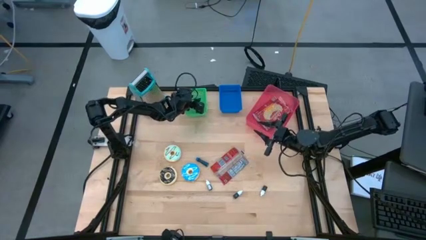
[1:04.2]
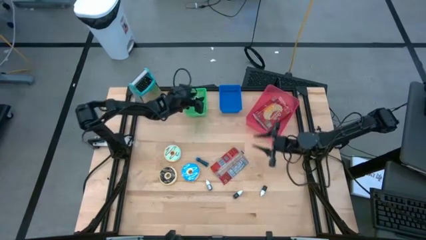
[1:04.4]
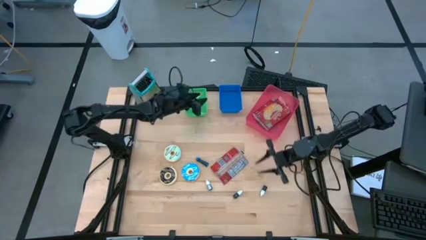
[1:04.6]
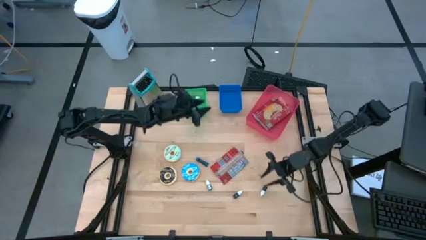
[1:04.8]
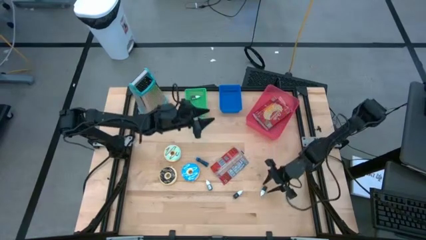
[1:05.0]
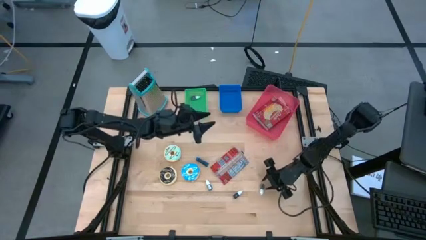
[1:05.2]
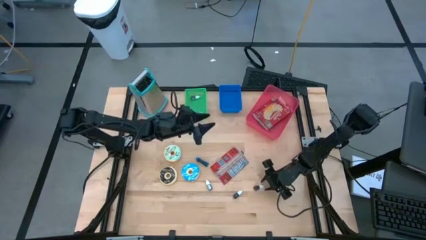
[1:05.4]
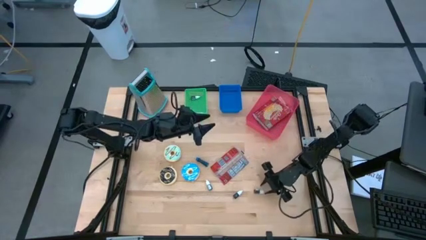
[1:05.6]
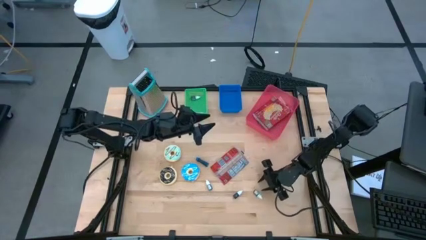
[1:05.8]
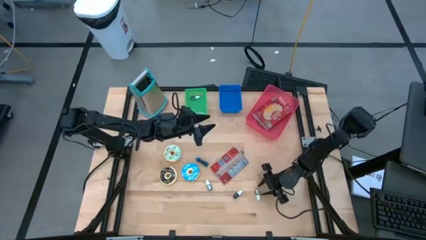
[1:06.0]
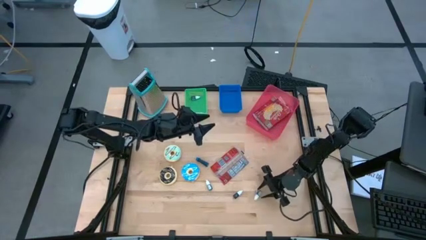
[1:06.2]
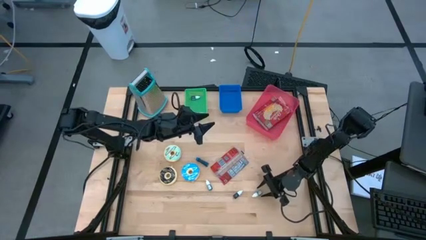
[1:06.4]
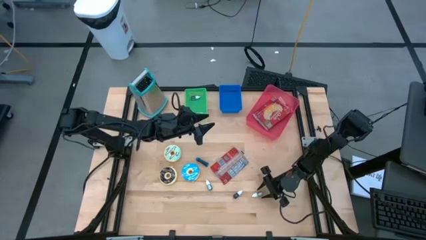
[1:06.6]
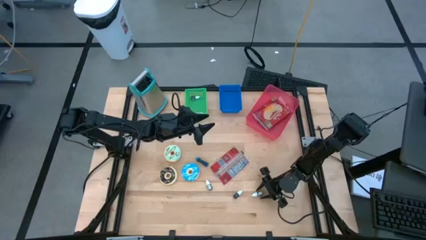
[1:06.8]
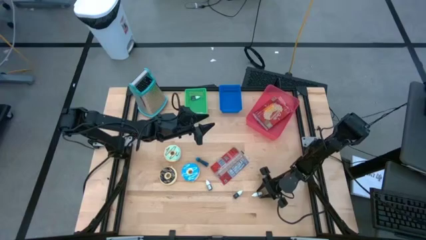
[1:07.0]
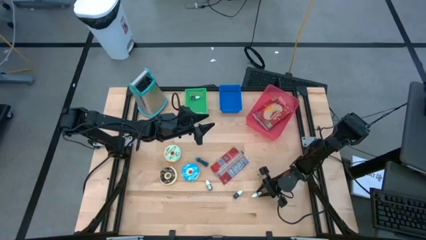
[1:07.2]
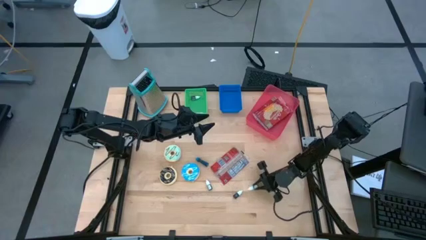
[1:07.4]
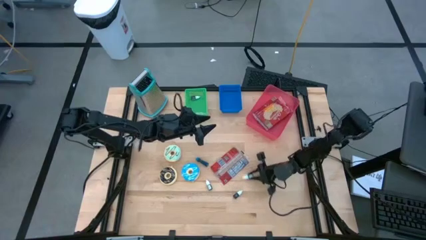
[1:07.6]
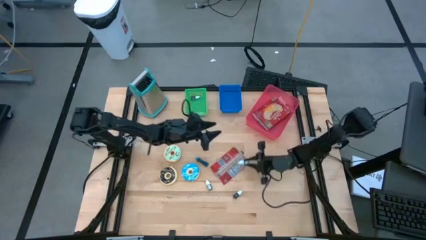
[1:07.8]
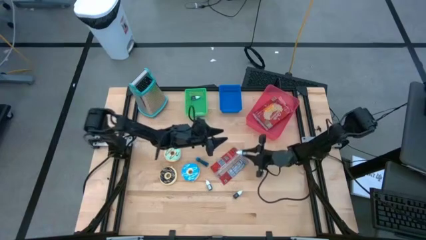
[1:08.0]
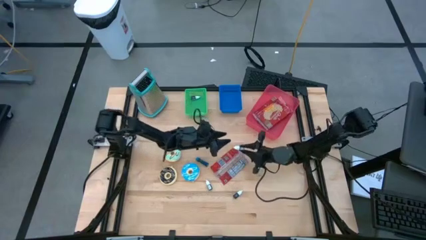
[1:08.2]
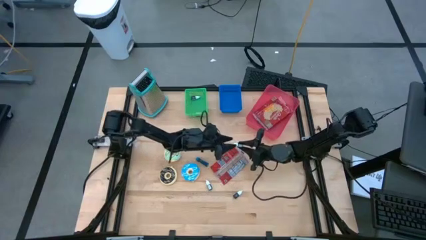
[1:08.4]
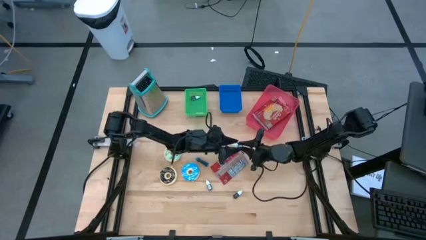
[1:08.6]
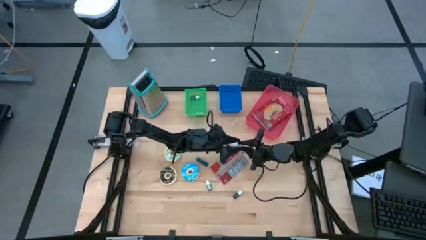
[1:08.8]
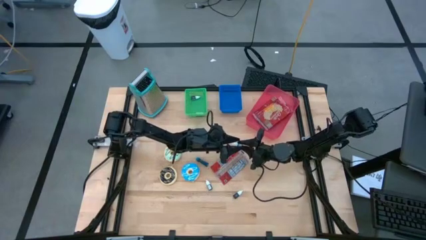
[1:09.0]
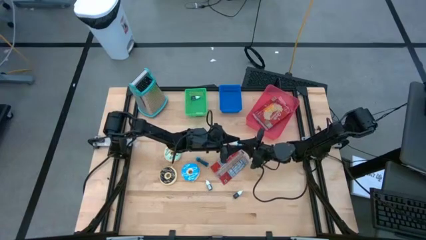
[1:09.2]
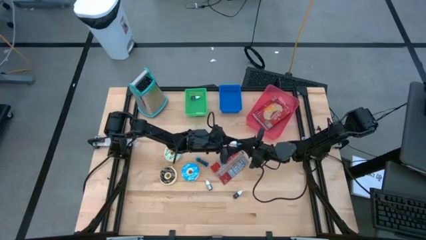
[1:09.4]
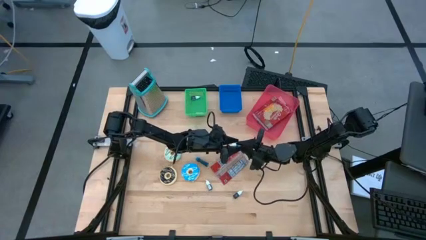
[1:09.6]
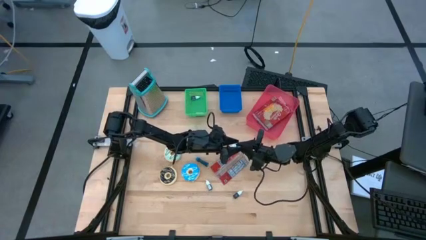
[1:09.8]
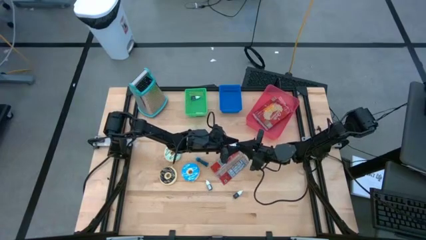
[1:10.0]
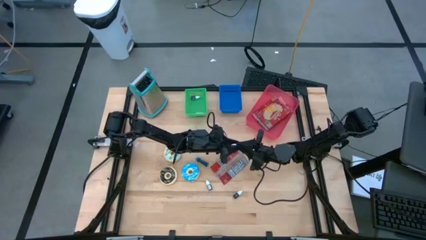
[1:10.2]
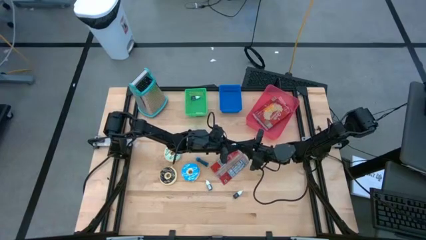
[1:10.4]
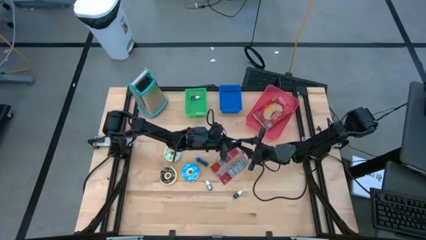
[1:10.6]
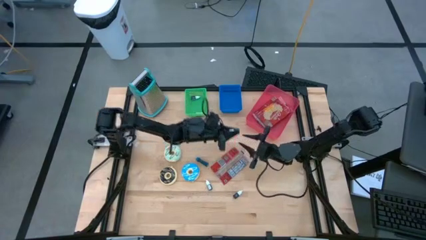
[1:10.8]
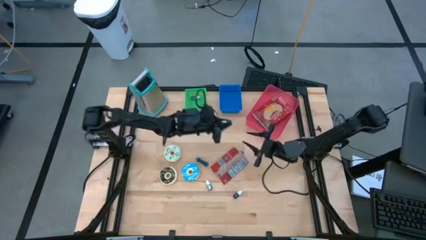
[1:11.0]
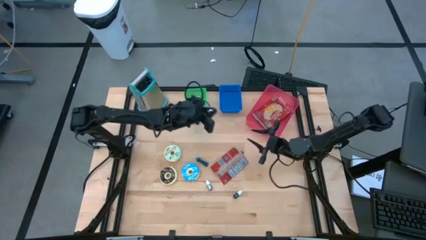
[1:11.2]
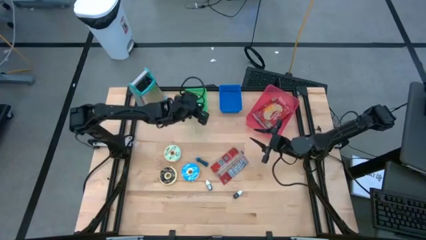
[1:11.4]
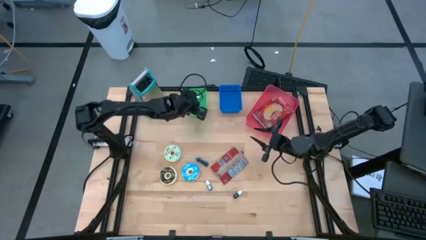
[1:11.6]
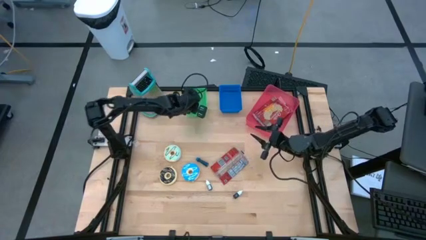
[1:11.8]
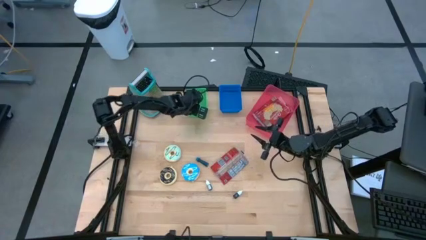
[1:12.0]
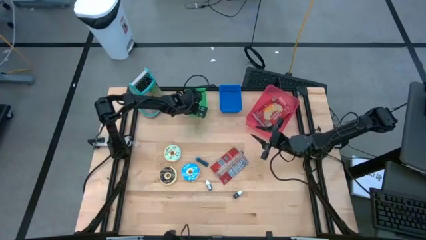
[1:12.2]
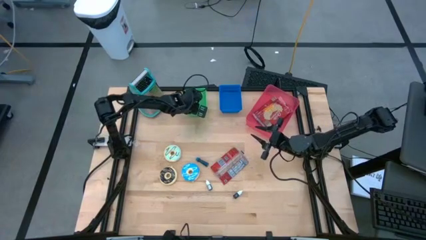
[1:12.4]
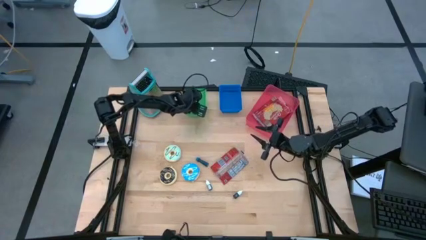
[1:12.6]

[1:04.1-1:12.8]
Put the bottom blue food coloring bottle into the green bin

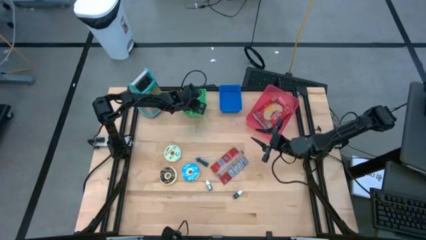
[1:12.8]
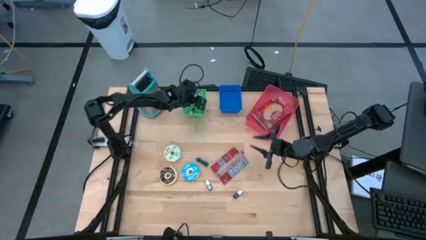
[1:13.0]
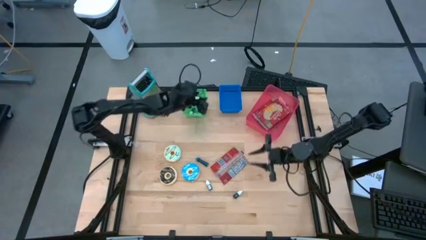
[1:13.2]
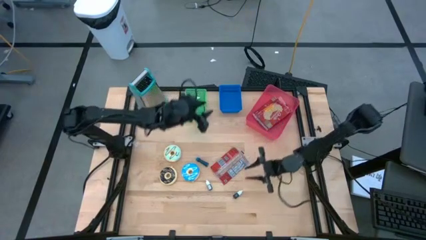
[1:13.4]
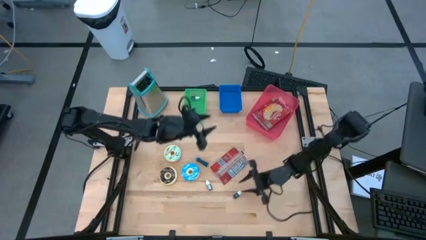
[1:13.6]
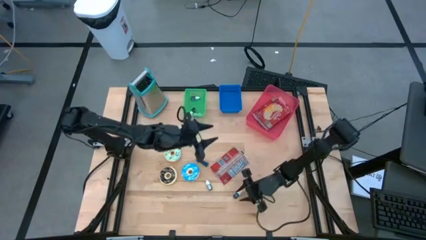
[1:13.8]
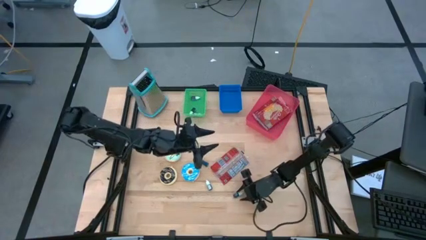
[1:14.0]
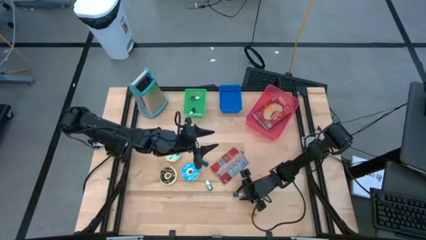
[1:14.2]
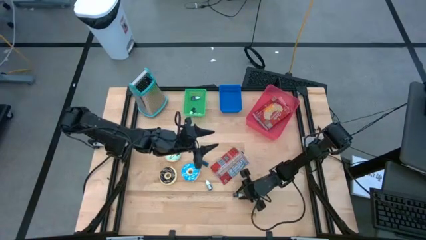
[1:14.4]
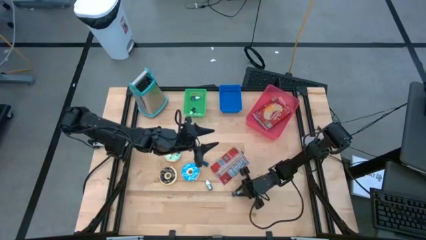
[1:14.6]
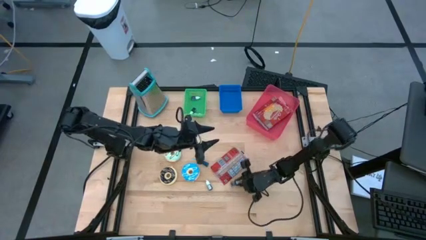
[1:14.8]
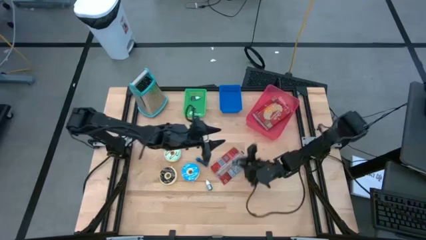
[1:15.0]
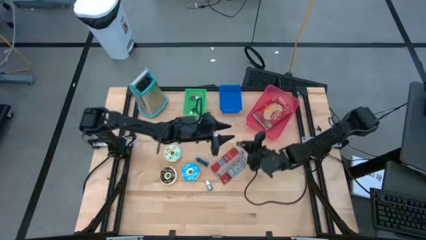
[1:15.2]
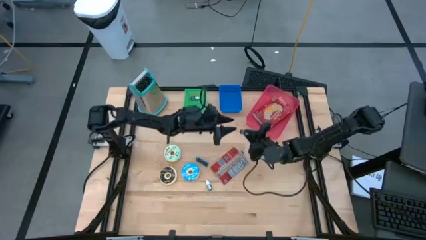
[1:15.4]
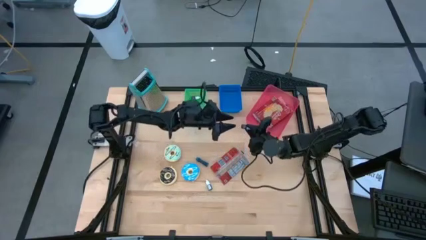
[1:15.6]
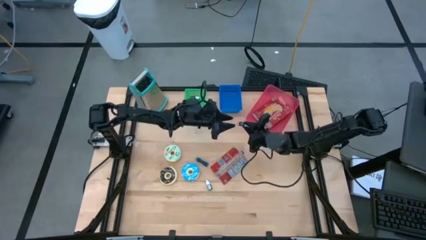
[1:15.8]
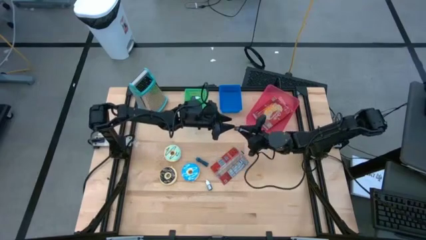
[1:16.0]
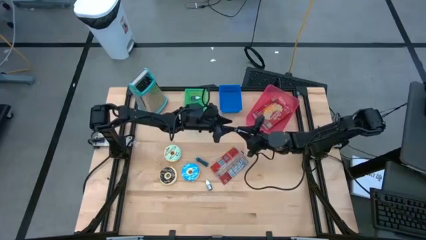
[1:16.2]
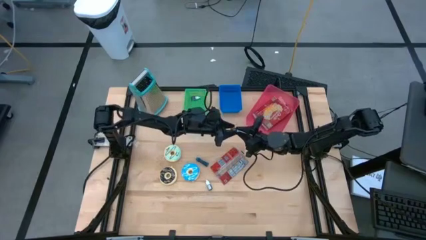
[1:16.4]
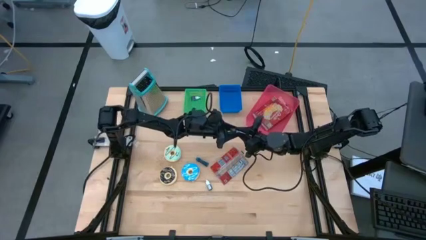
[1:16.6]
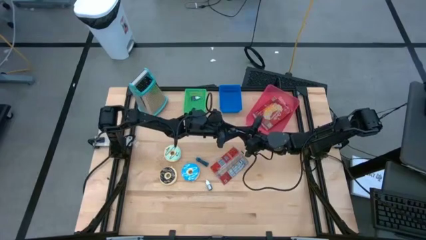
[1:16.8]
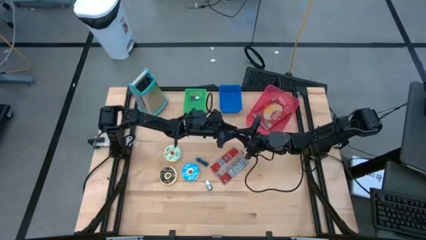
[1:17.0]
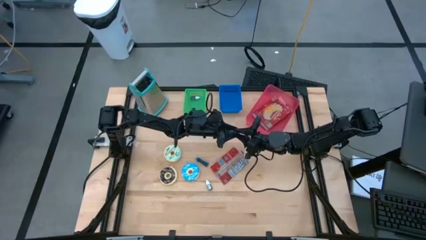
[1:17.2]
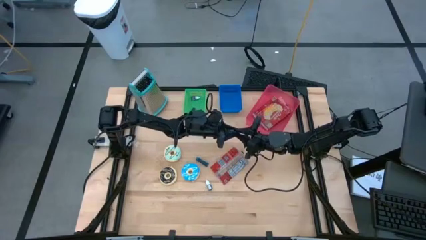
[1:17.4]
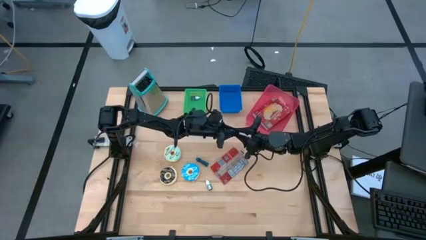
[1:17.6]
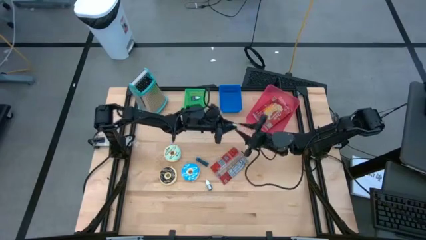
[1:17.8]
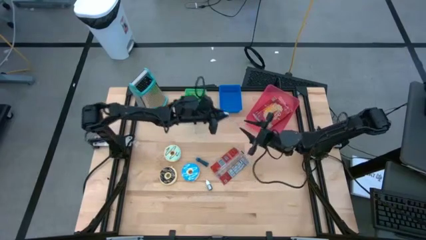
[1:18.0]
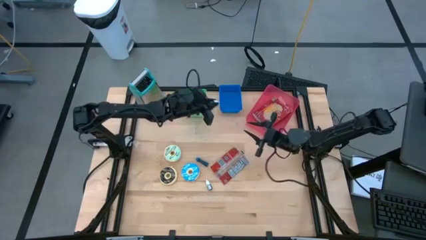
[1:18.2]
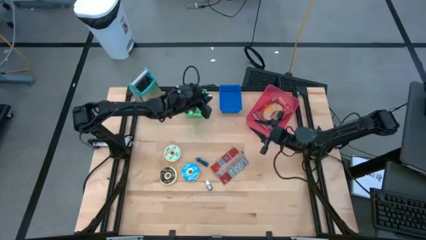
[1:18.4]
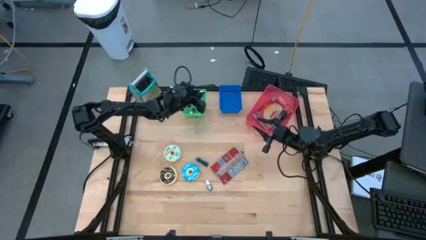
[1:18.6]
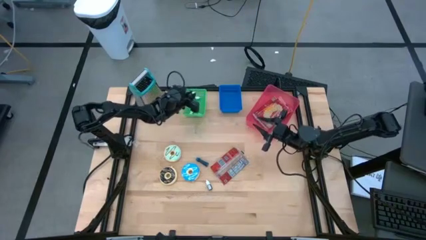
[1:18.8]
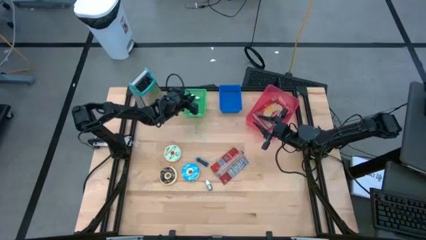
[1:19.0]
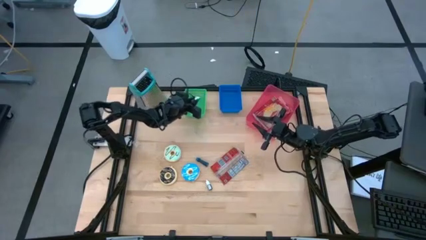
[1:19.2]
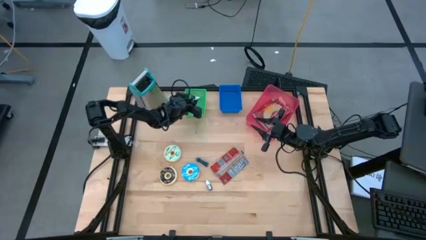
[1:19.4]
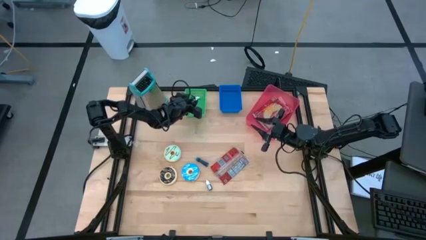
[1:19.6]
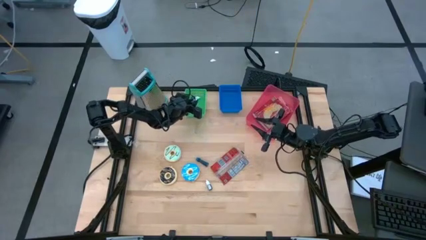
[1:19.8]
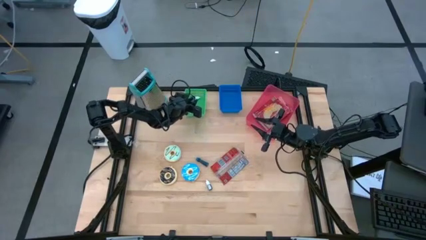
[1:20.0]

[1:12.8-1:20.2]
Put the green food coloring bottle into the green bin
